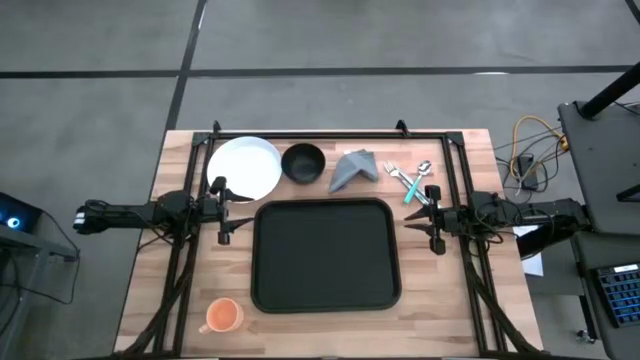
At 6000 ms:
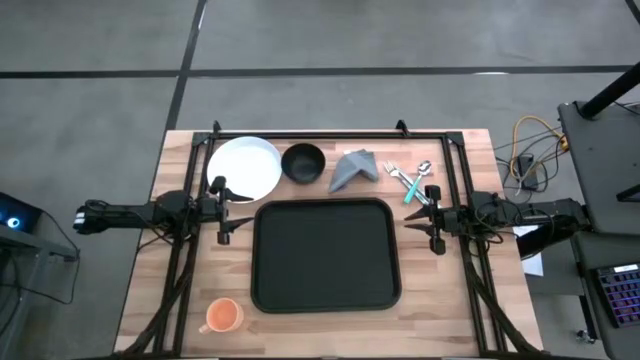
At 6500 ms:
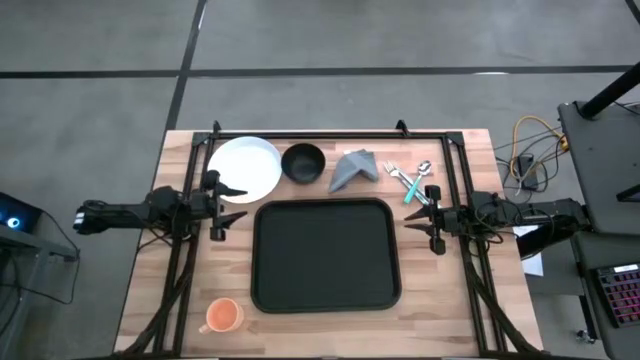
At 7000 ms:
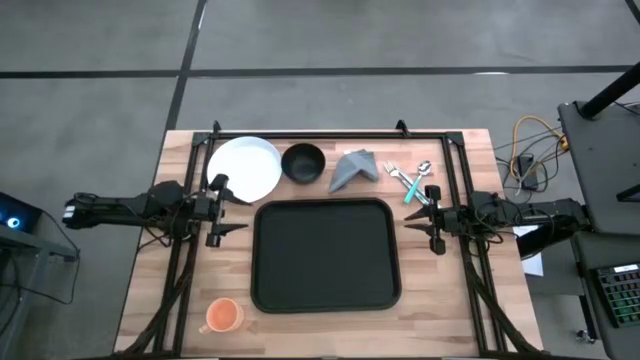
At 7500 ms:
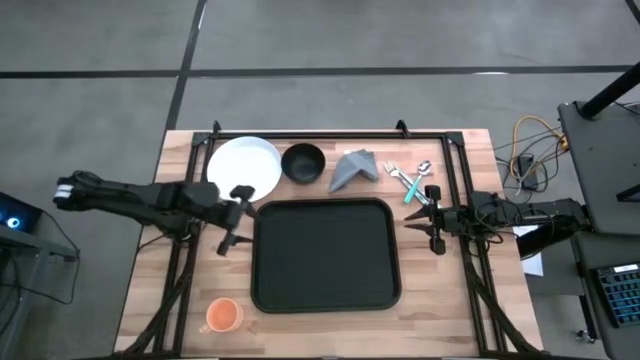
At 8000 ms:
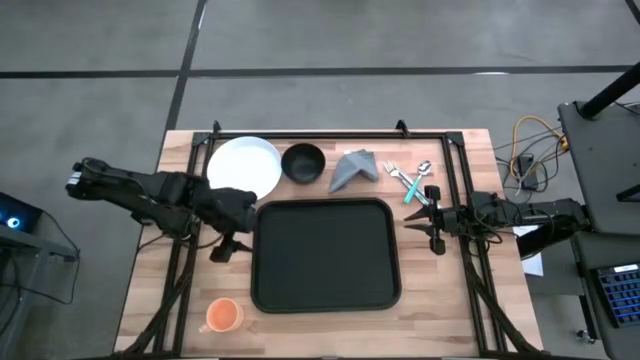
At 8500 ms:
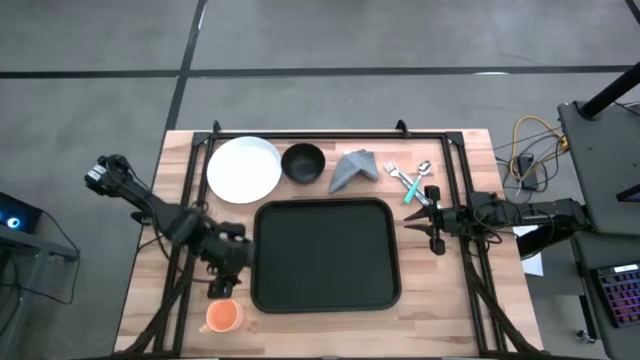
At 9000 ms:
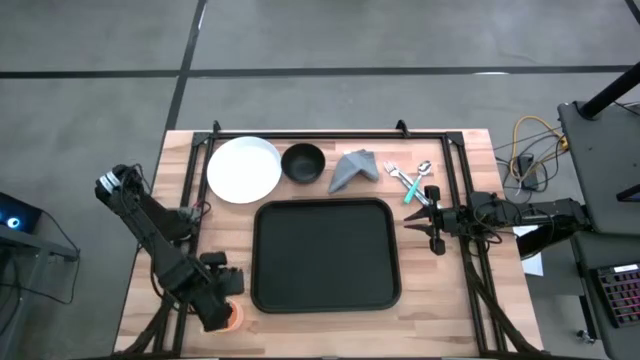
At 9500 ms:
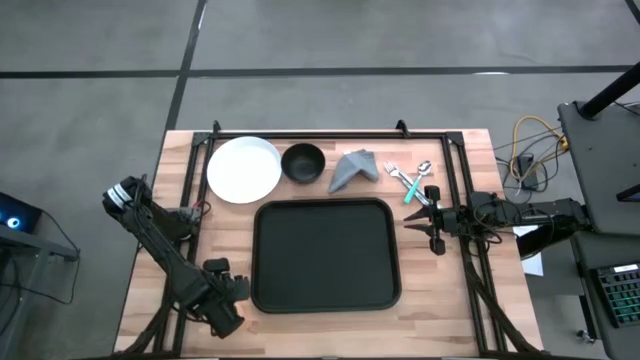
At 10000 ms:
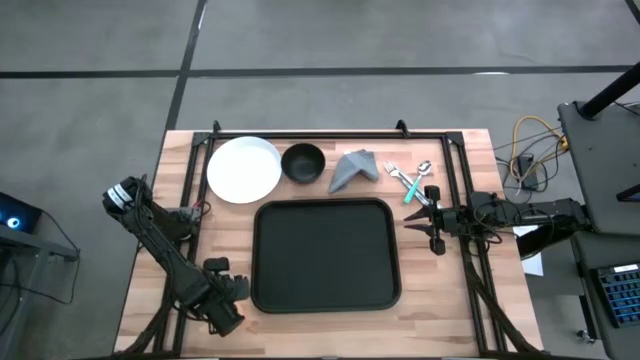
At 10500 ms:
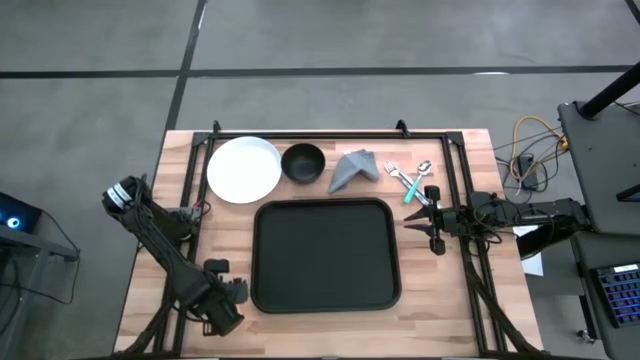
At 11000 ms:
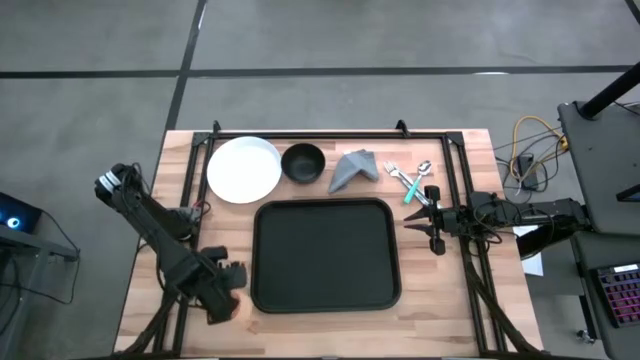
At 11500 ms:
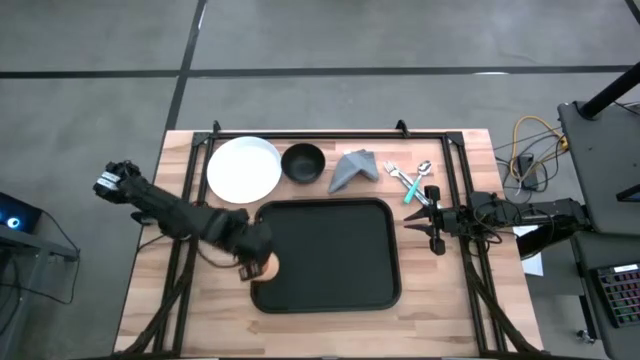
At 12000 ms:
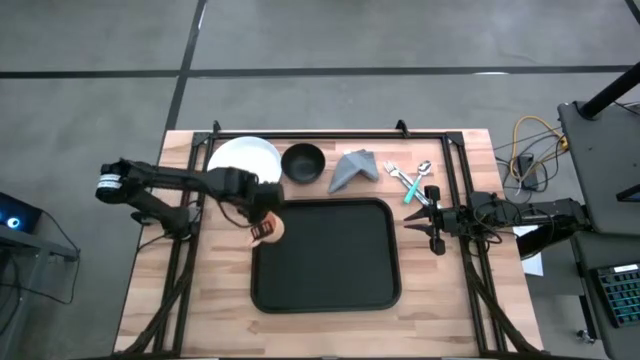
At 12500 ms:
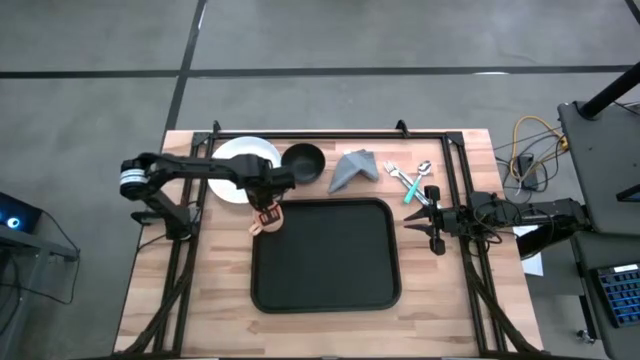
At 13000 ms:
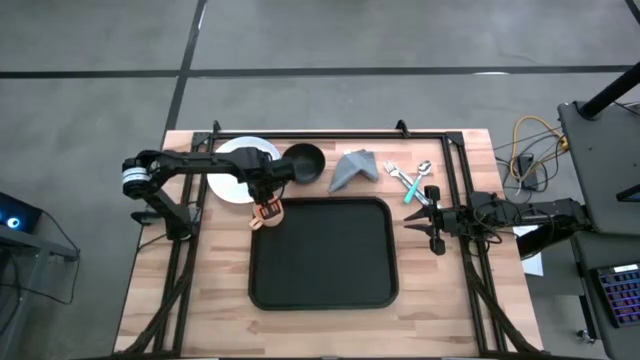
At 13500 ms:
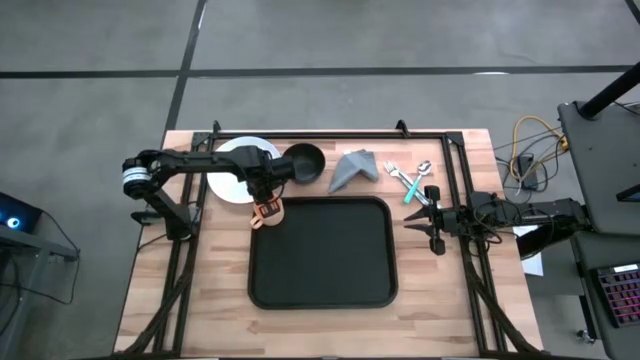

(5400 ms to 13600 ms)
Task: Set up tray
Put the orange mug on the top left of the black tray

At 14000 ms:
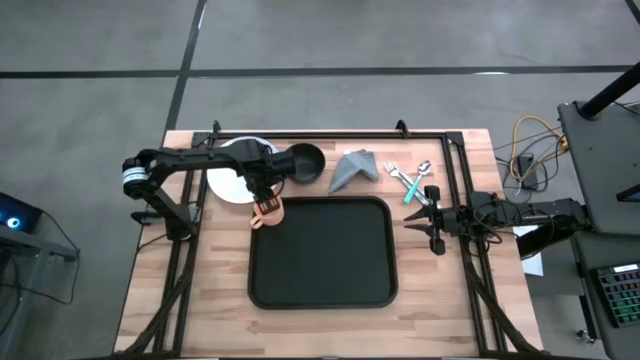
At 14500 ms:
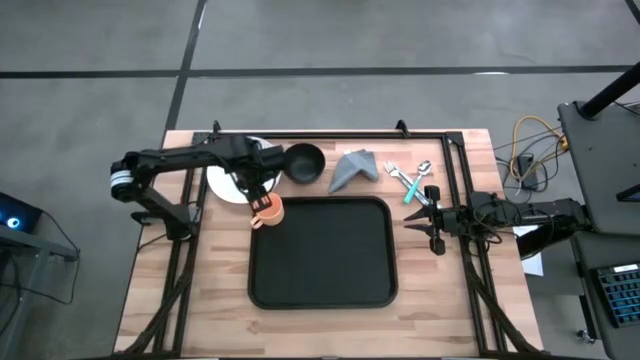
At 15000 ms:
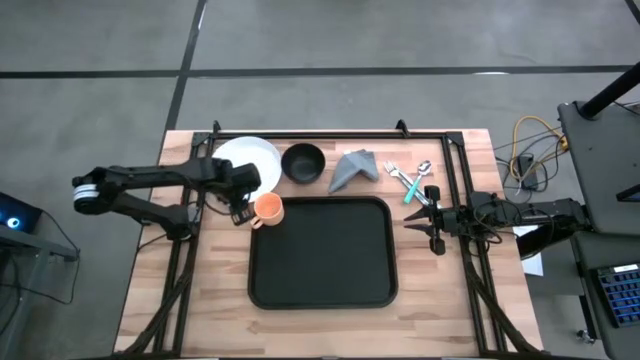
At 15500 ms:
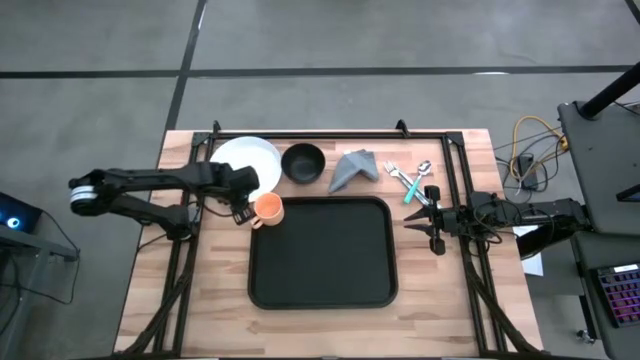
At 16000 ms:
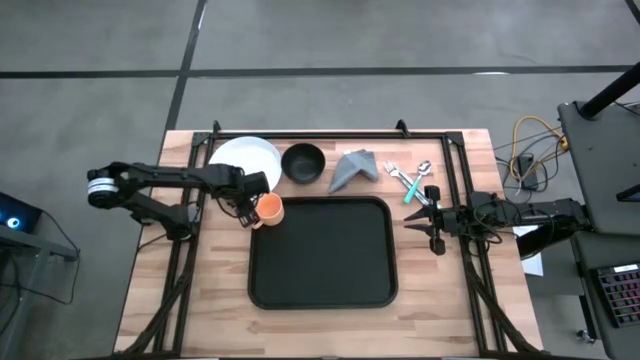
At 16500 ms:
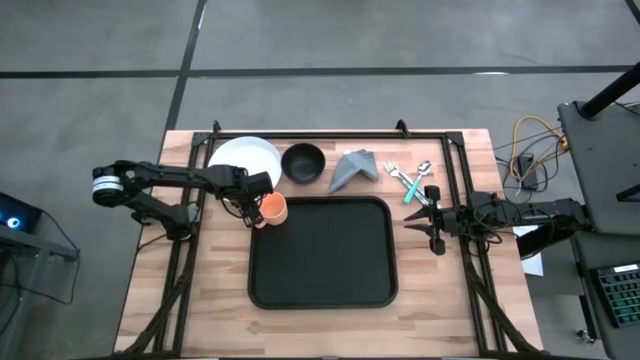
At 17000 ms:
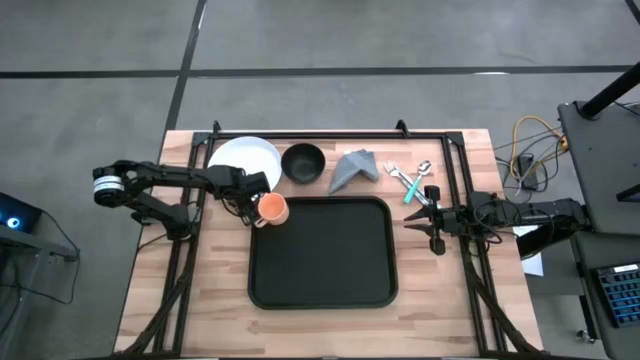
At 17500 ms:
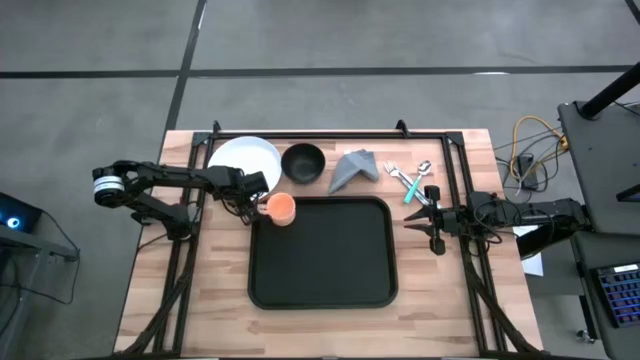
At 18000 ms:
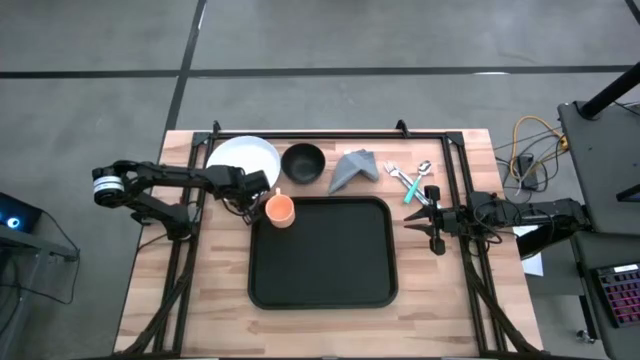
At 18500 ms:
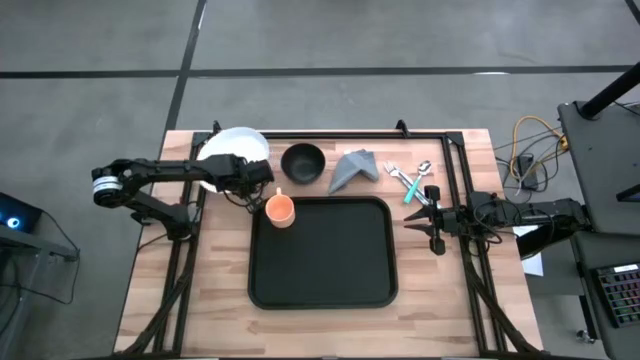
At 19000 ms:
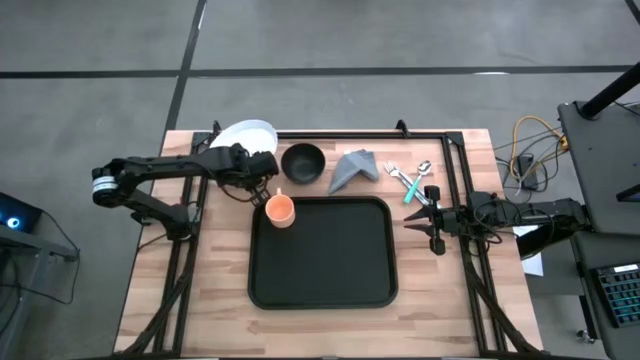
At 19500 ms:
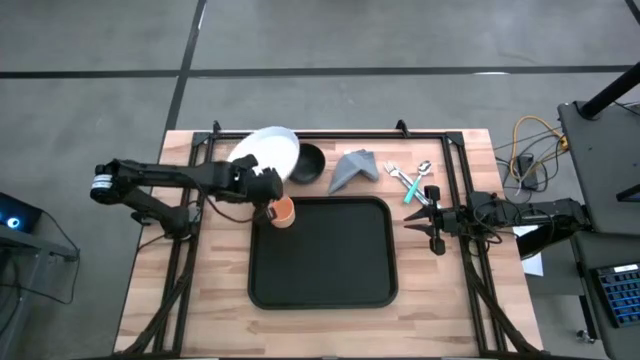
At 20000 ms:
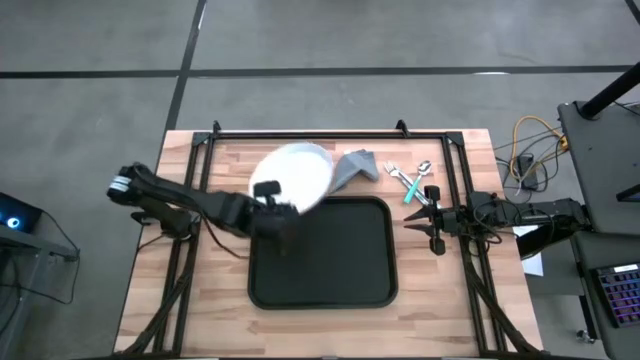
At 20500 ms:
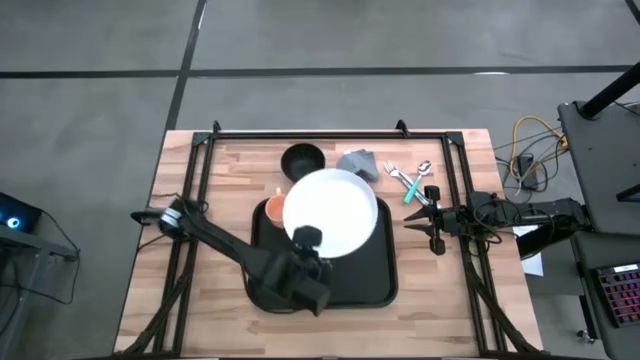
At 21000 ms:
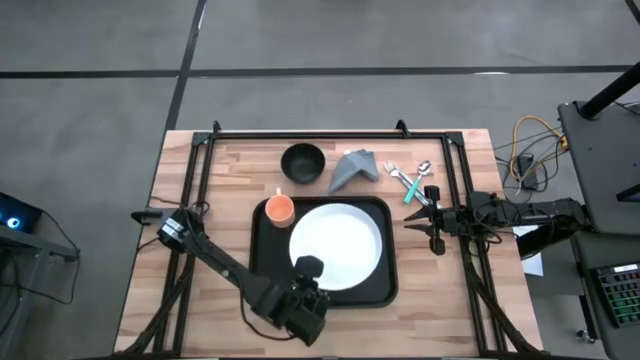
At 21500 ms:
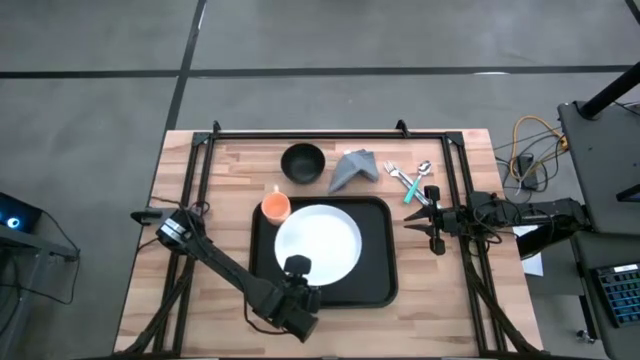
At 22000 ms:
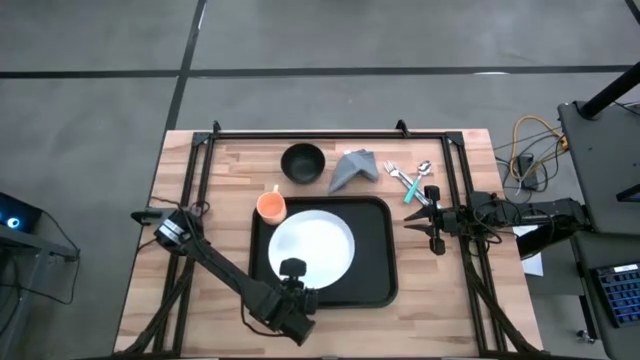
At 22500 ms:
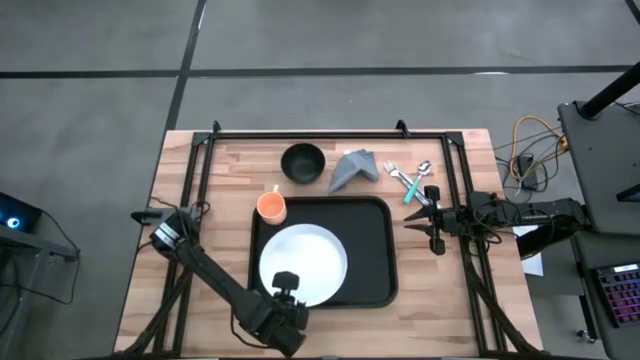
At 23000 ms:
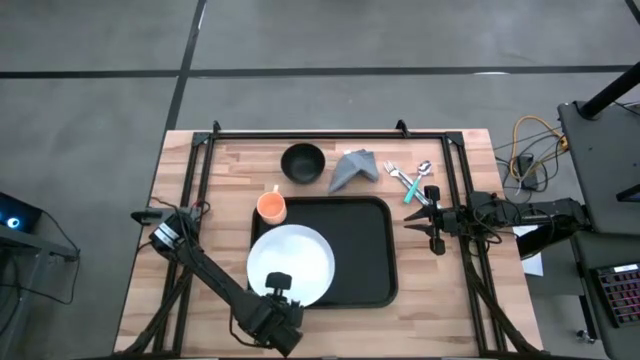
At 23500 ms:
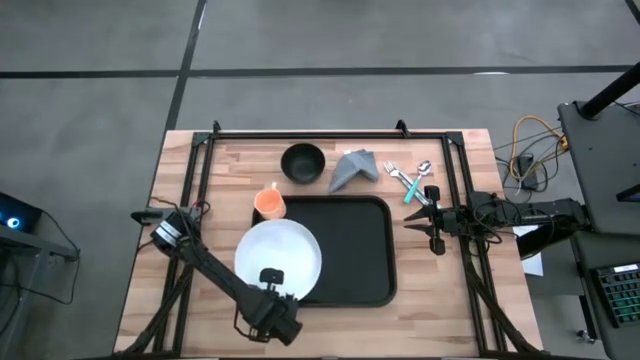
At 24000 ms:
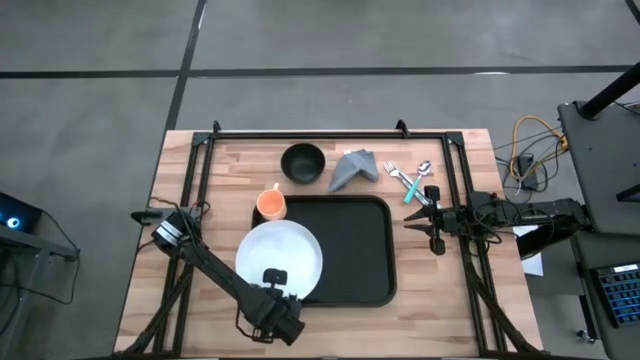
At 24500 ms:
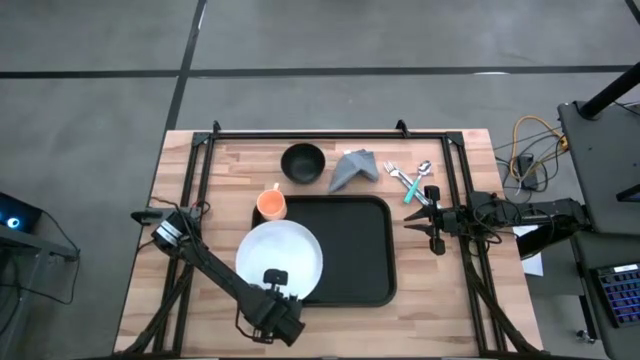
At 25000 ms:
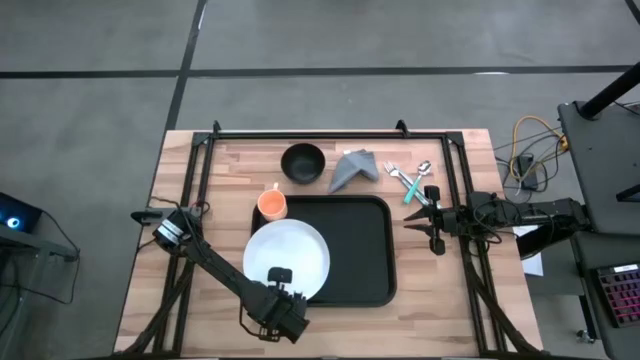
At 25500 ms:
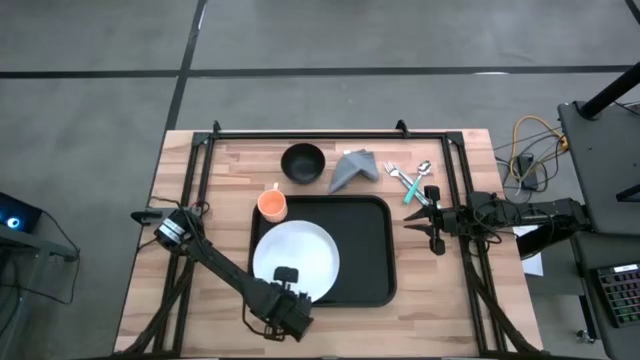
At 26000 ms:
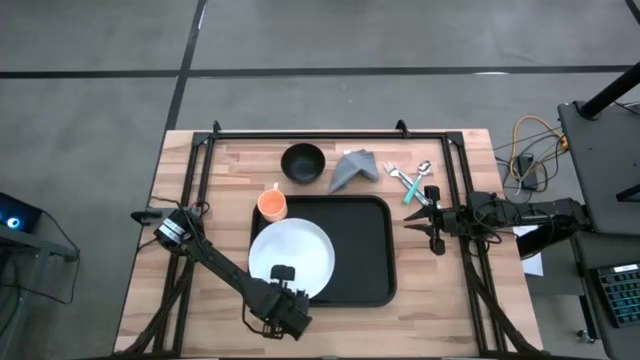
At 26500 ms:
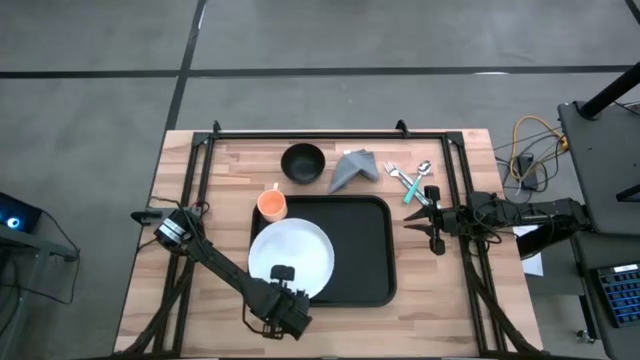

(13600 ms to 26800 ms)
Put the white plate on the left side of the black tray
